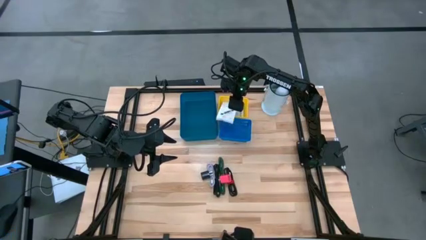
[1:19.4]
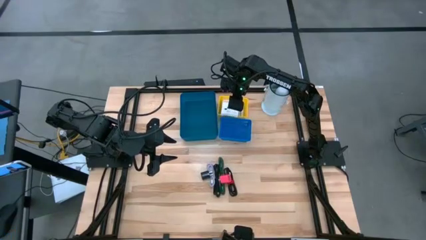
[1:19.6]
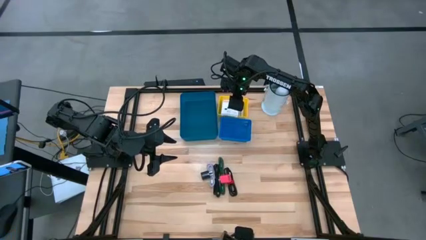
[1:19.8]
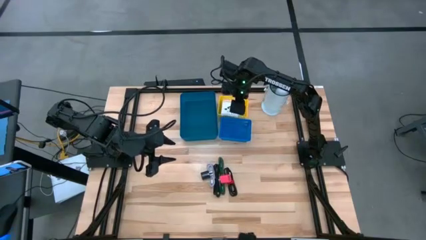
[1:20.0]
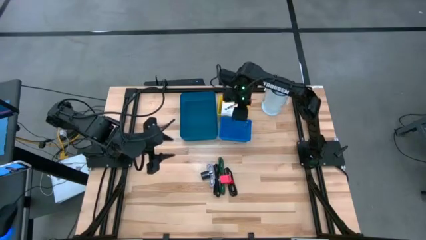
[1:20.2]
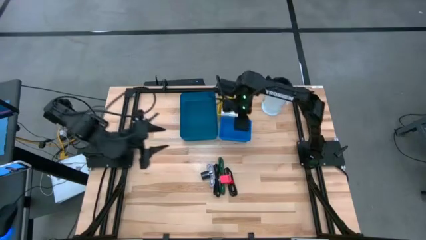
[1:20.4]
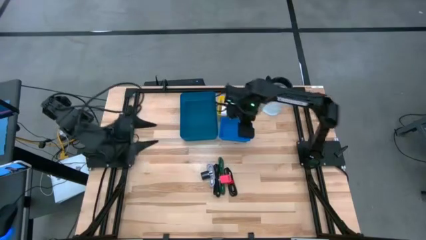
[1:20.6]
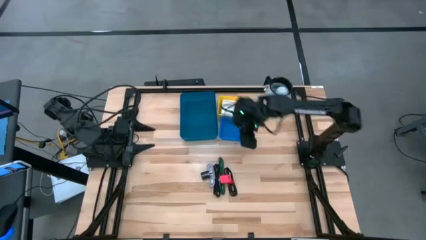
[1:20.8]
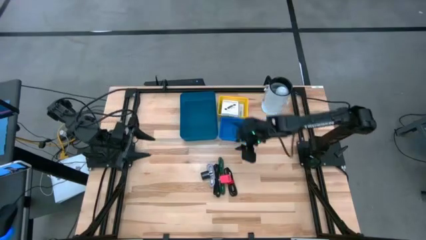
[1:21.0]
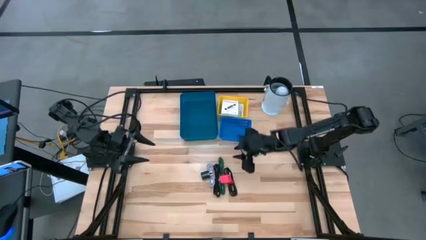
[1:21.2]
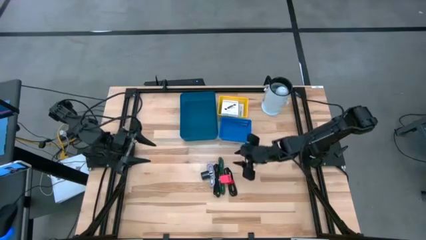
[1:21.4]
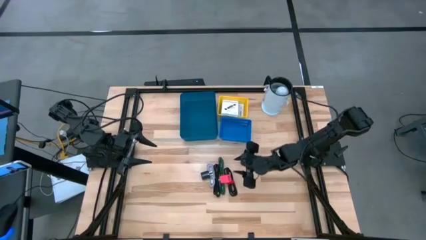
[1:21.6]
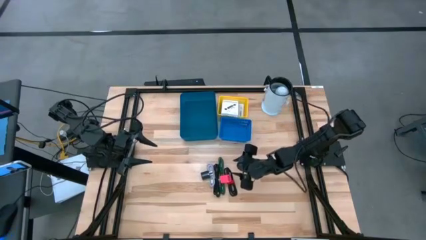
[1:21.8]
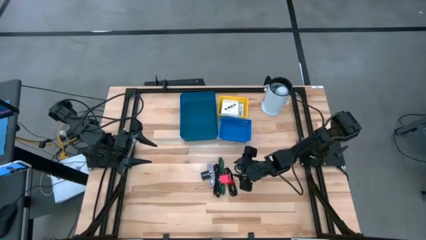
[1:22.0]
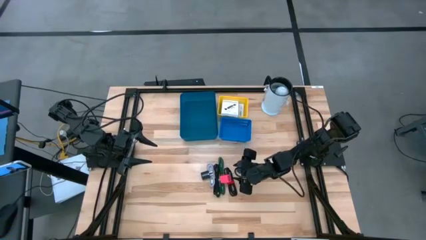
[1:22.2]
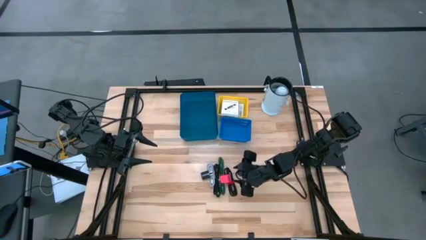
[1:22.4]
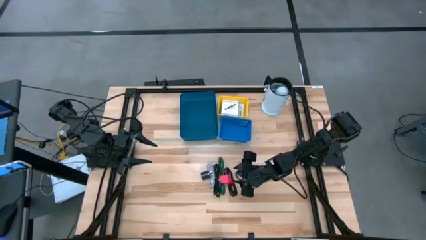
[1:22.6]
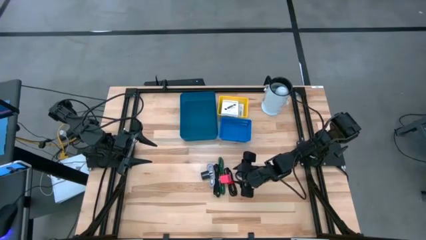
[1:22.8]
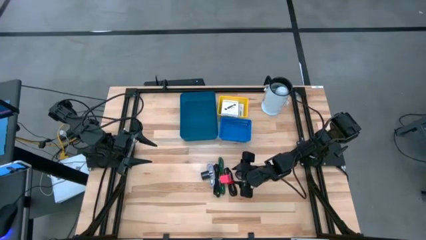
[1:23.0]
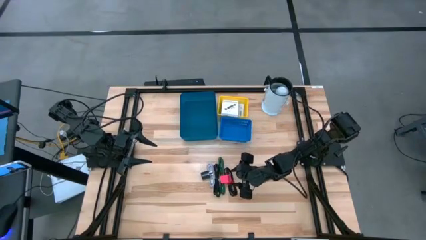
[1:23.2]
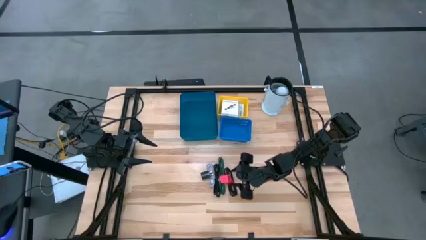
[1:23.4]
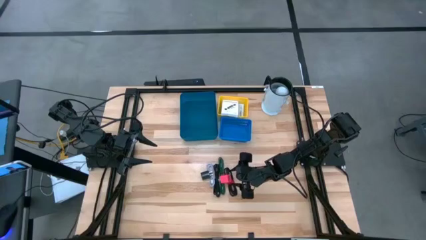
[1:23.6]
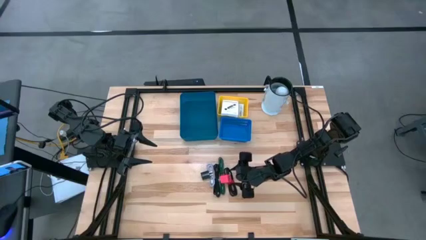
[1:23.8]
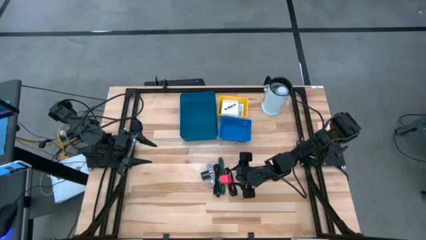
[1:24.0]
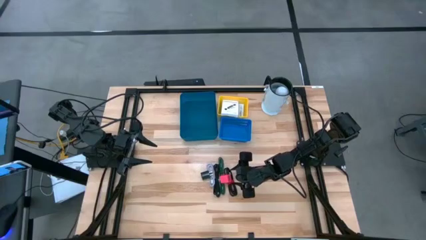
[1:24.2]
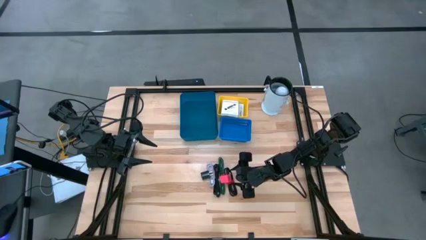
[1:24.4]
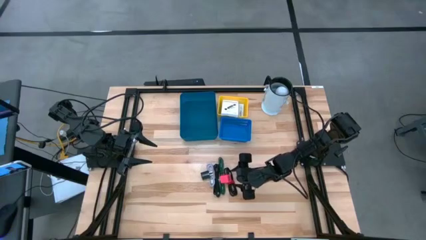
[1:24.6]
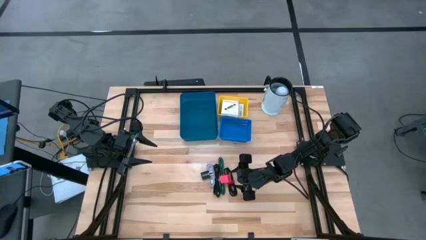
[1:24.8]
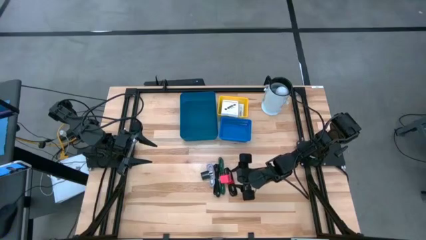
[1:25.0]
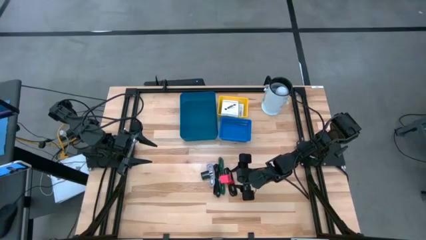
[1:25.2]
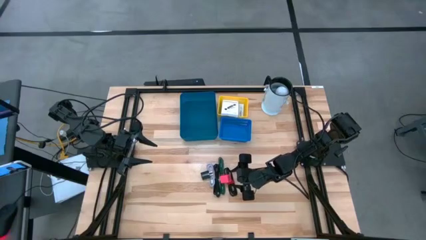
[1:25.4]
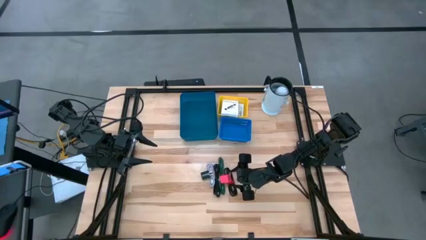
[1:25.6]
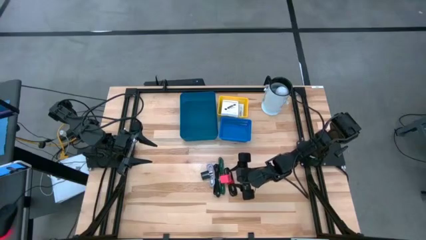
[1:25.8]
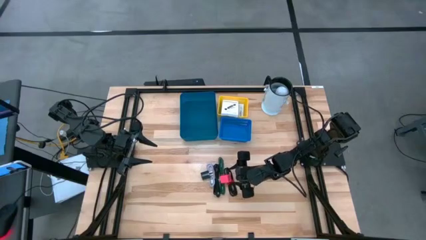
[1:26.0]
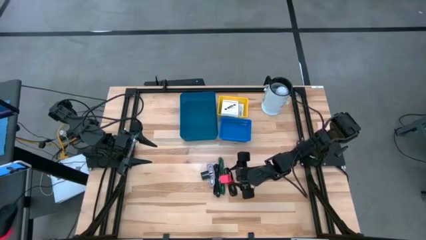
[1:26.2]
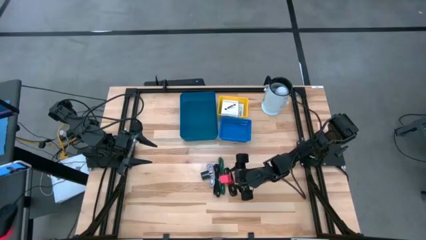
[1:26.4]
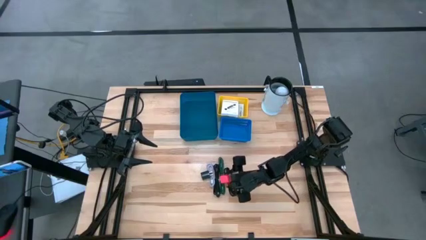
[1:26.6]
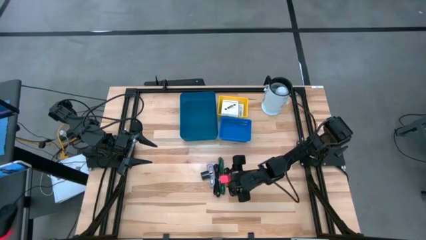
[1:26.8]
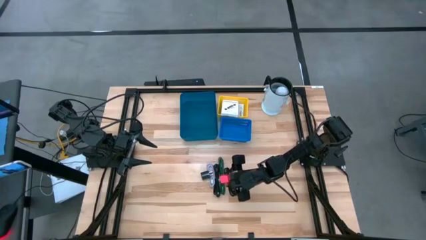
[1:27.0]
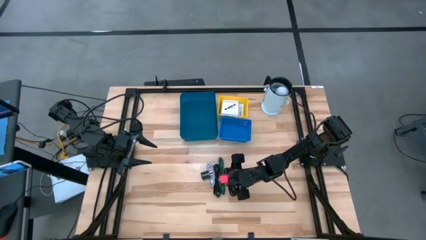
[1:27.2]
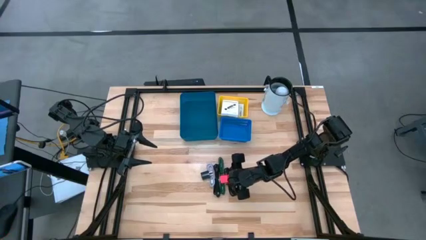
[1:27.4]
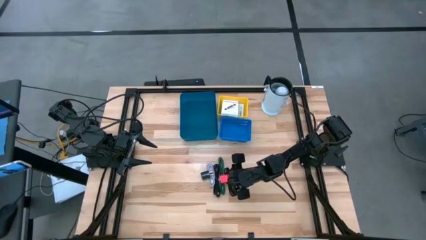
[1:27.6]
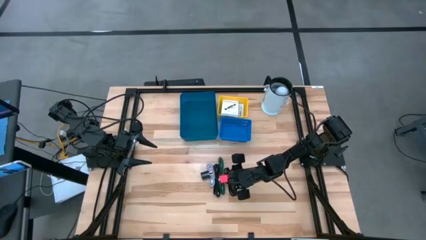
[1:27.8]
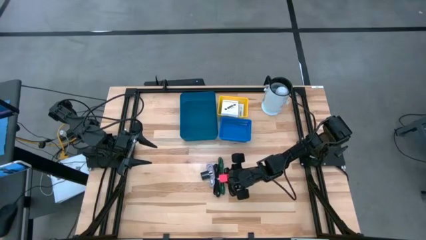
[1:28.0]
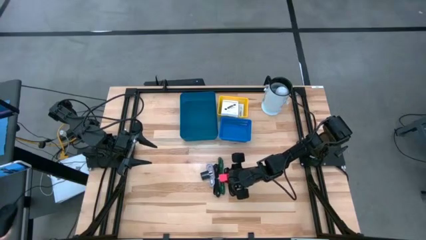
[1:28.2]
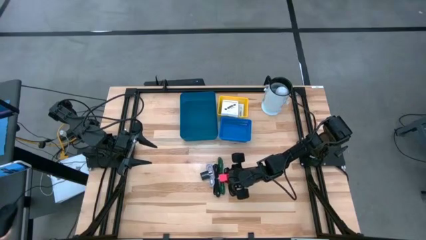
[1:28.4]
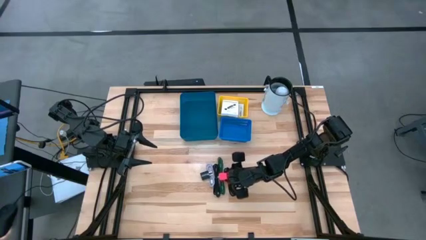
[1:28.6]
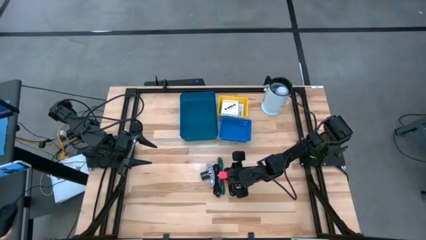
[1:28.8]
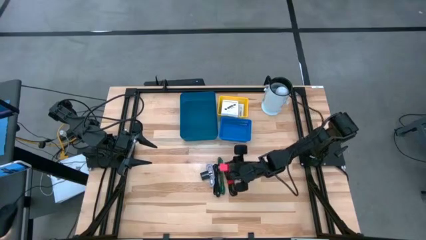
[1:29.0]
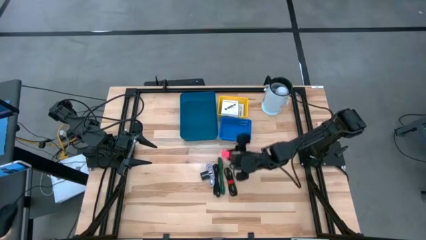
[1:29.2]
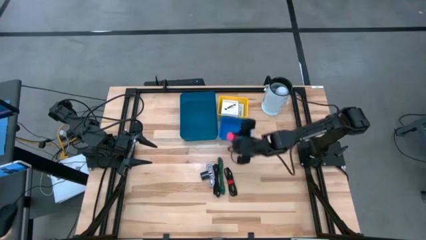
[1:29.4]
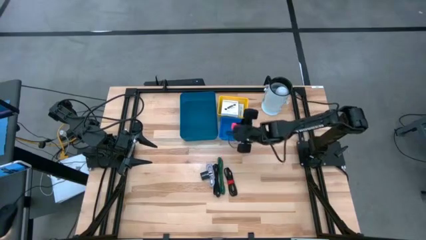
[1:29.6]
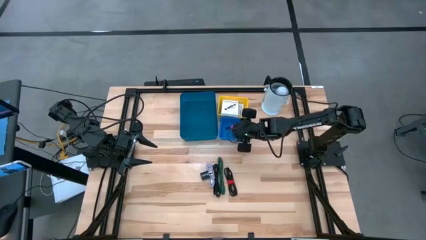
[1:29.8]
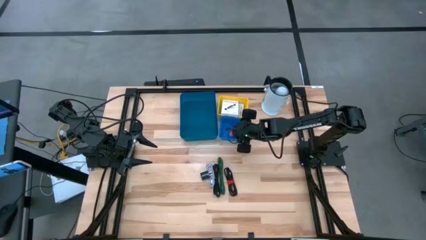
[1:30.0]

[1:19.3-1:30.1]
Task: Pick and place items into bin
Put the pink charger adapter into the small blue bin

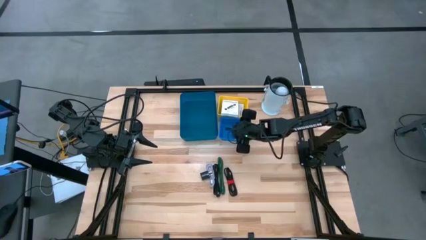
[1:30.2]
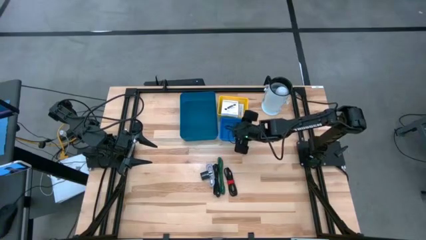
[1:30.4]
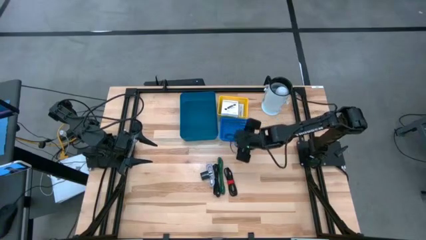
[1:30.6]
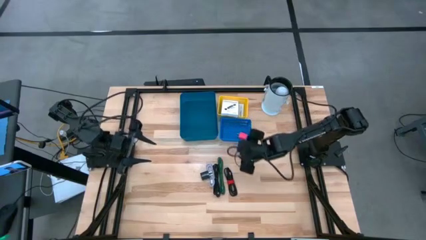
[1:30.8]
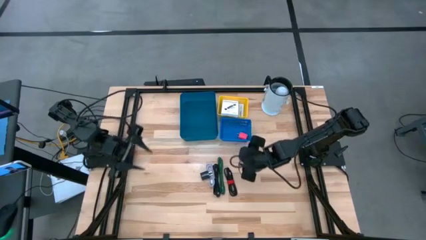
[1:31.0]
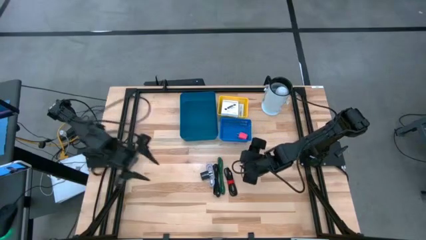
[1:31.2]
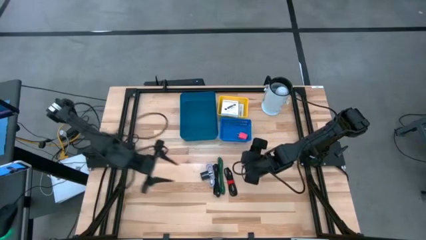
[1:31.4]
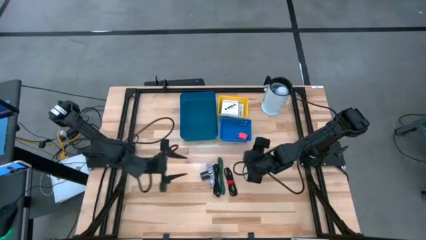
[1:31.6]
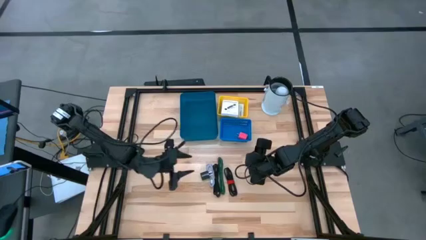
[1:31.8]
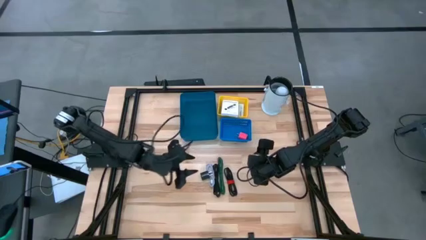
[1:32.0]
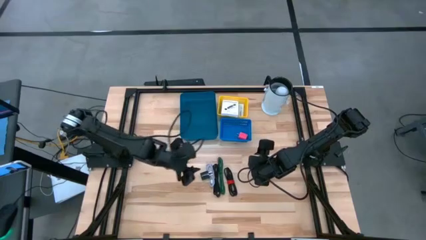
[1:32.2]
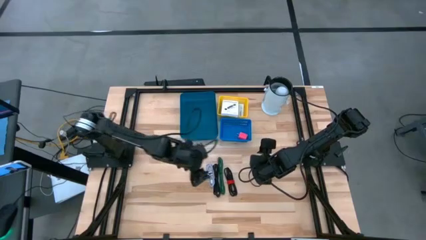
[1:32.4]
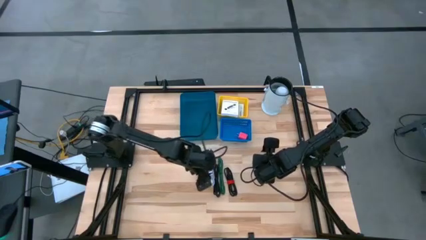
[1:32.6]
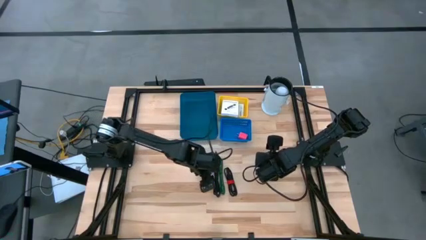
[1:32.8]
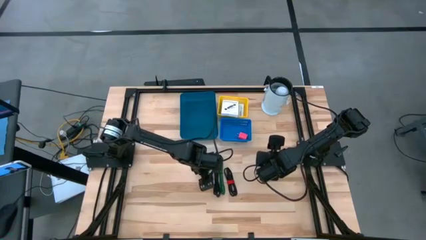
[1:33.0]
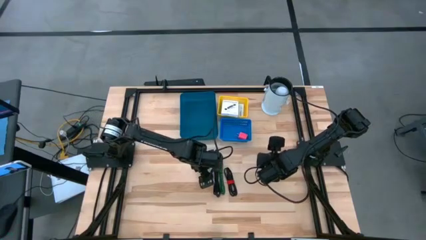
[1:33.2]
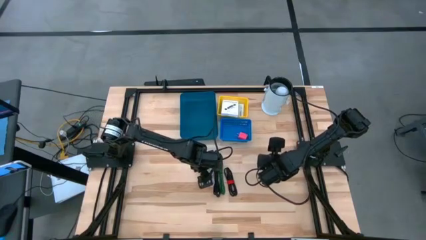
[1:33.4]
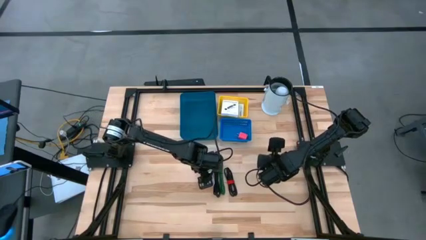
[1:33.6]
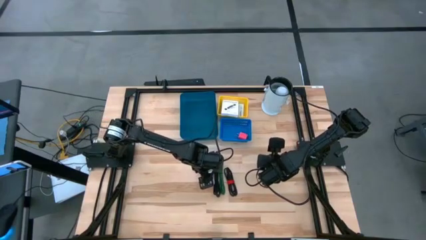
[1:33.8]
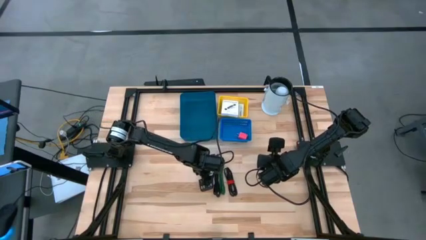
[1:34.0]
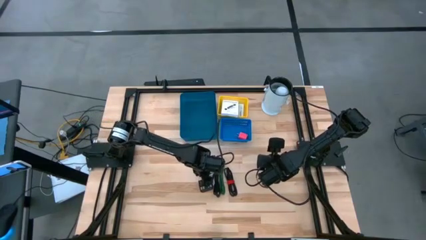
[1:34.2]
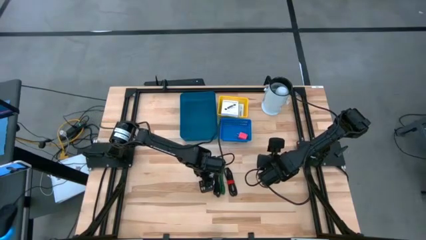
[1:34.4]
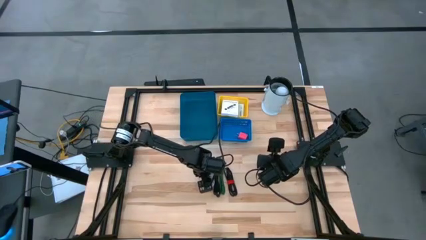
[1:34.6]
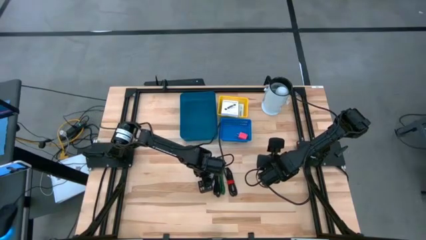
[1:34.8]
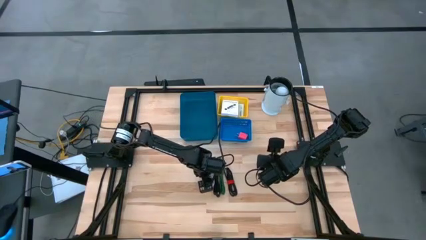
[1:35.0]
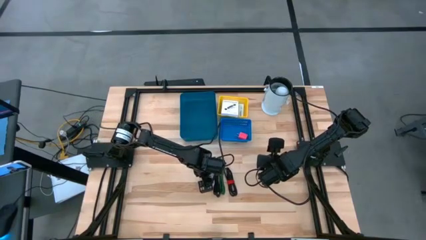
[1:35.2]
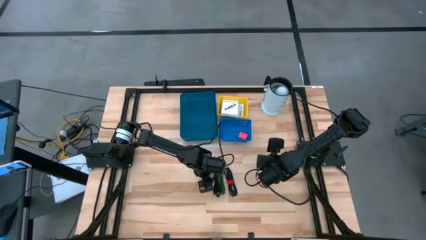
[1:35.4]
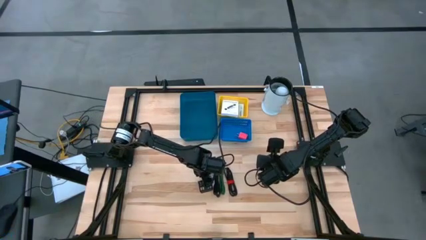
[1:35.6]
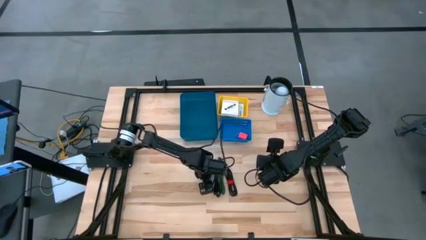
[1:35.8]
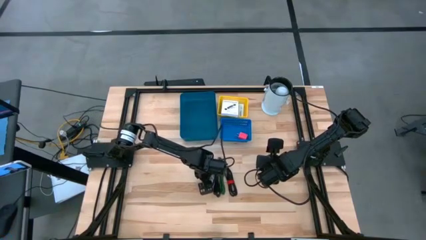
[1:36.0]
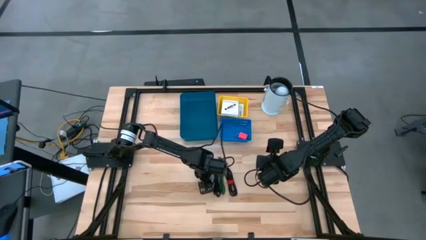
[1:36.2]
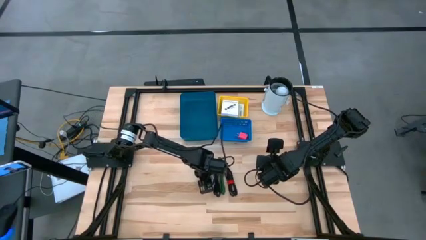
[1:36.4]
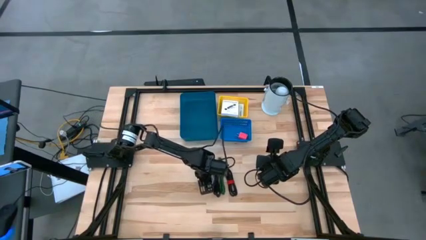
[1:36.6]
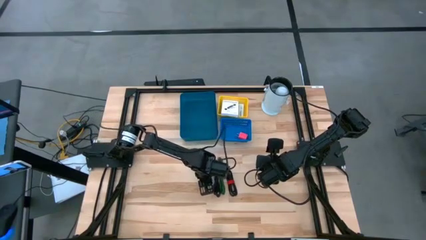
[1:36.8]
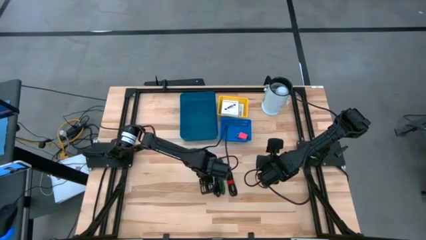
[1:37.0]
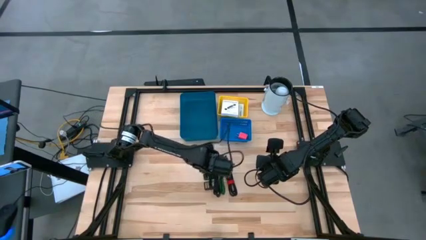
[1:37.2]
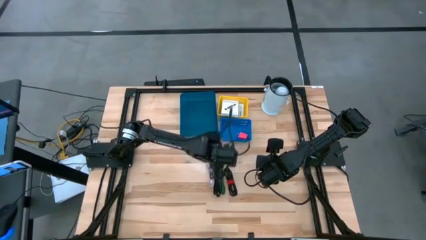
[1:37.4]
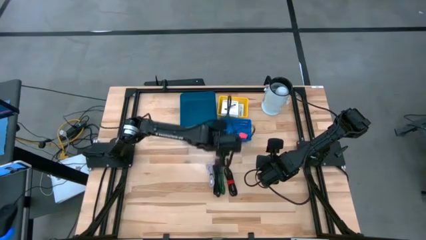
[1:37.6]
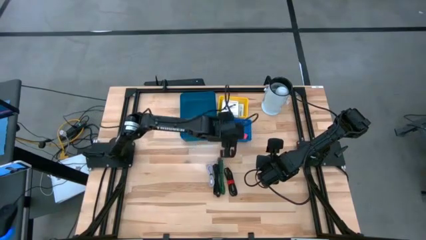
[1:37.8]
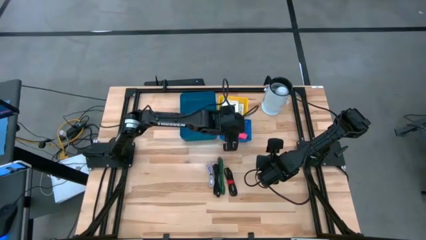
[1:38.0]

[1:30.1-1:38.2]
Put the black charger adapter into the small blue bin
